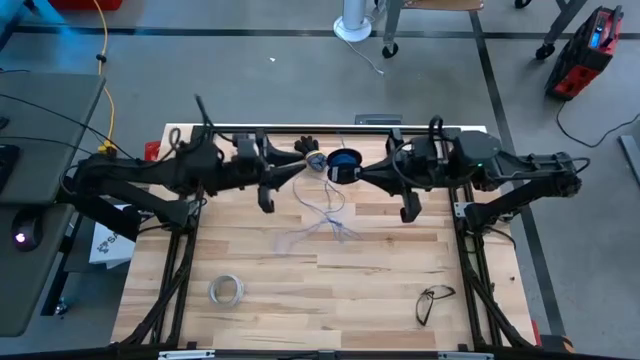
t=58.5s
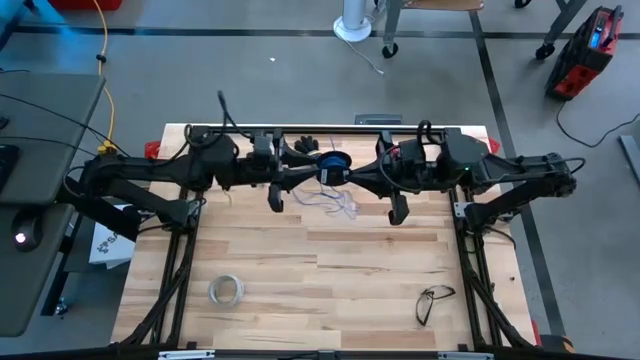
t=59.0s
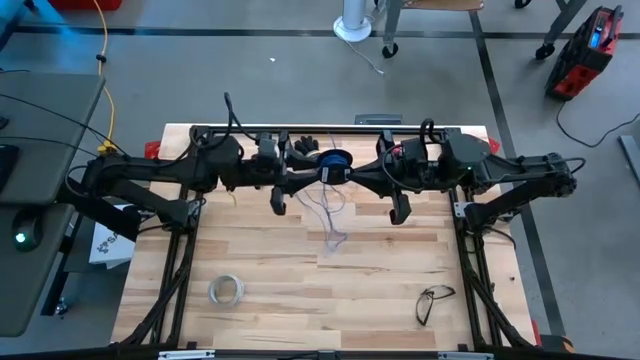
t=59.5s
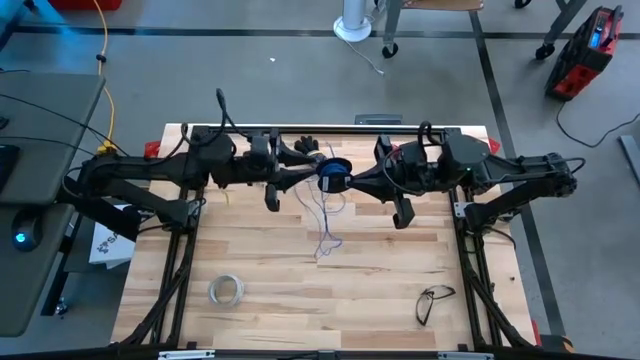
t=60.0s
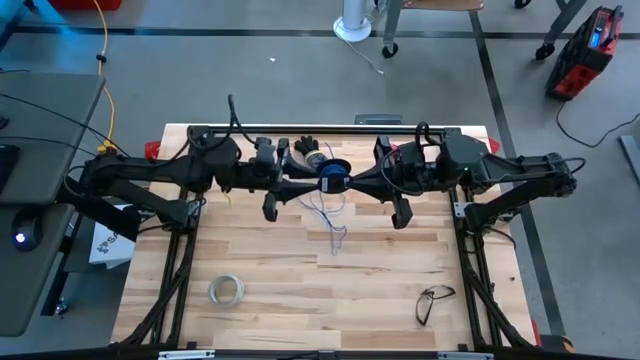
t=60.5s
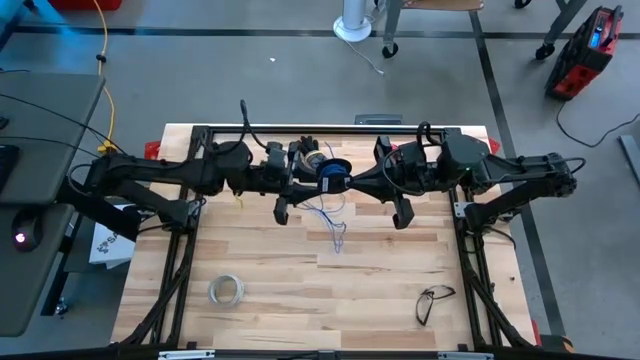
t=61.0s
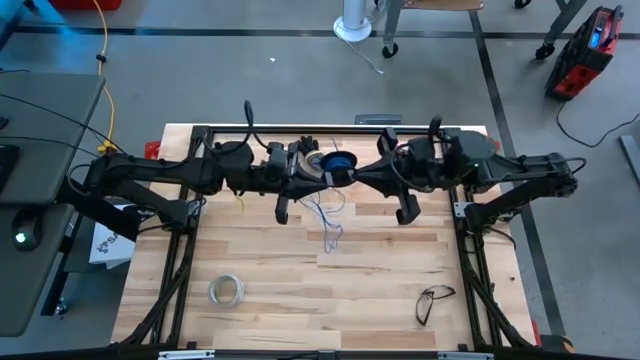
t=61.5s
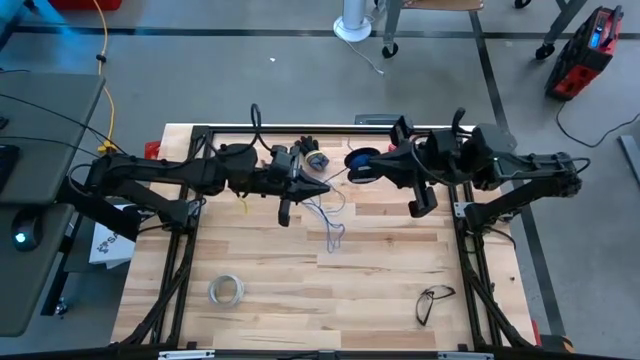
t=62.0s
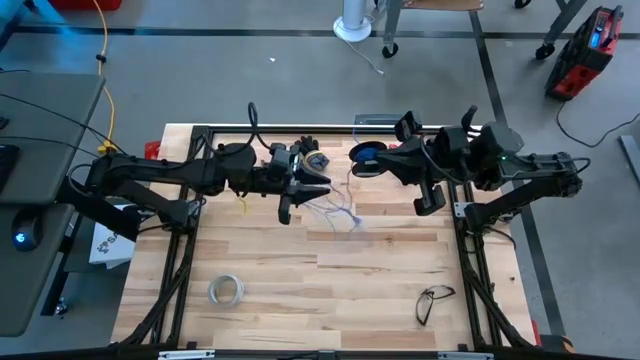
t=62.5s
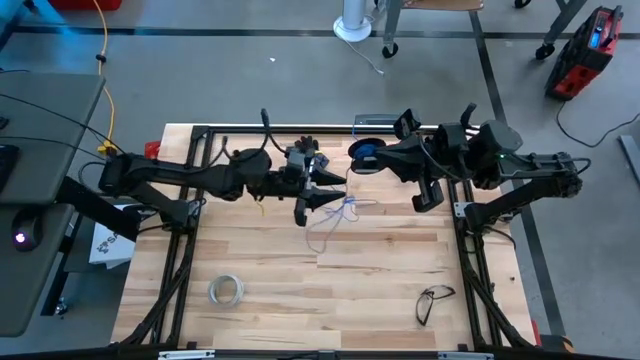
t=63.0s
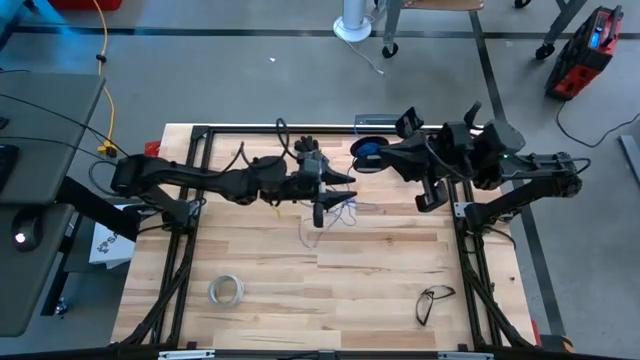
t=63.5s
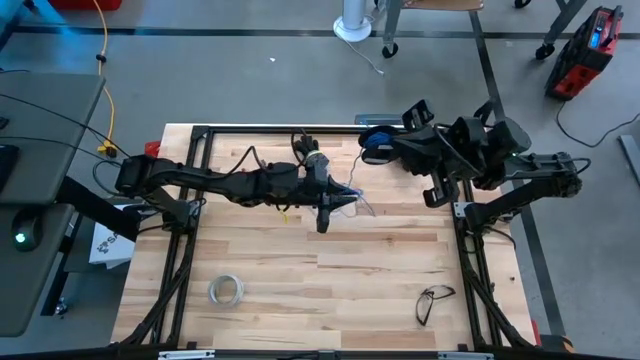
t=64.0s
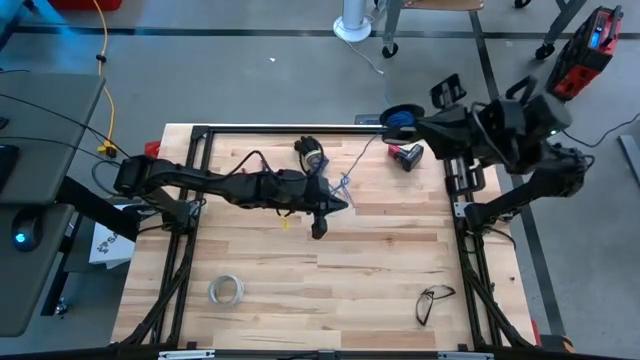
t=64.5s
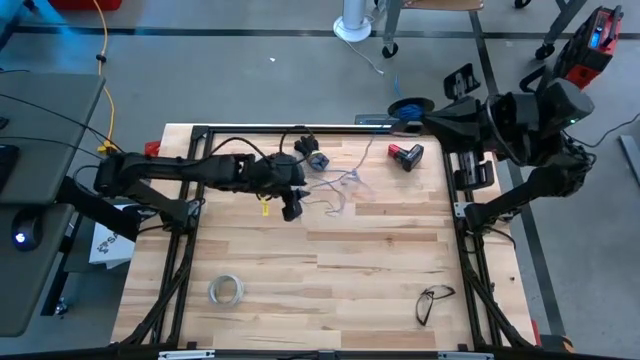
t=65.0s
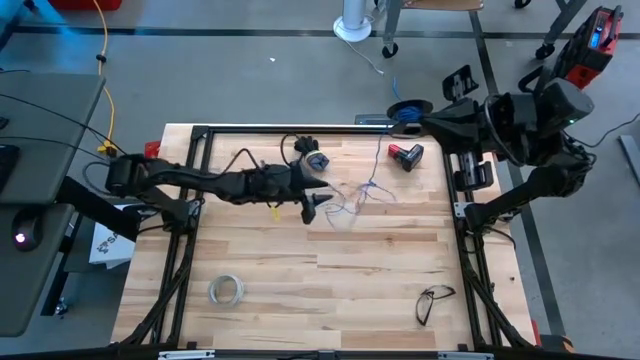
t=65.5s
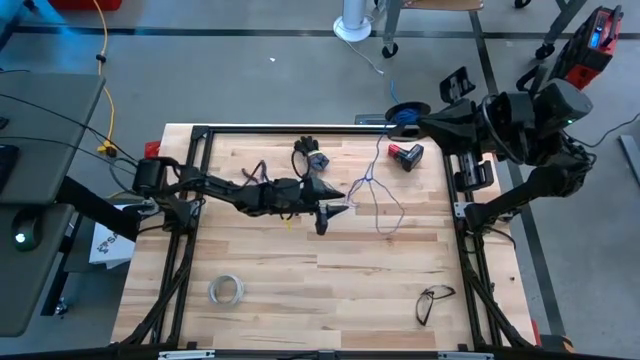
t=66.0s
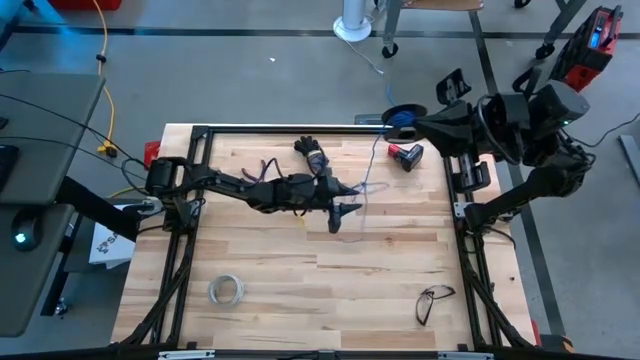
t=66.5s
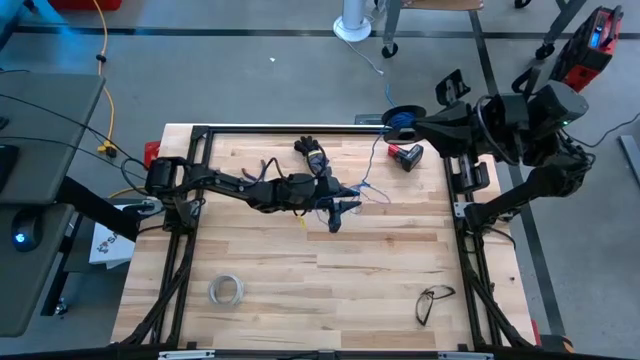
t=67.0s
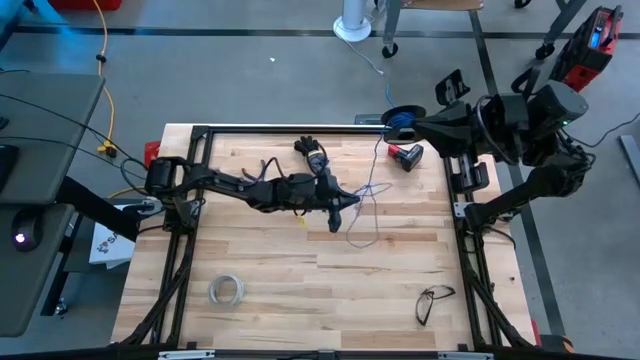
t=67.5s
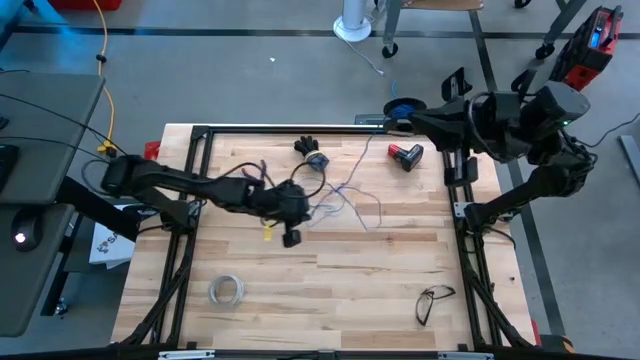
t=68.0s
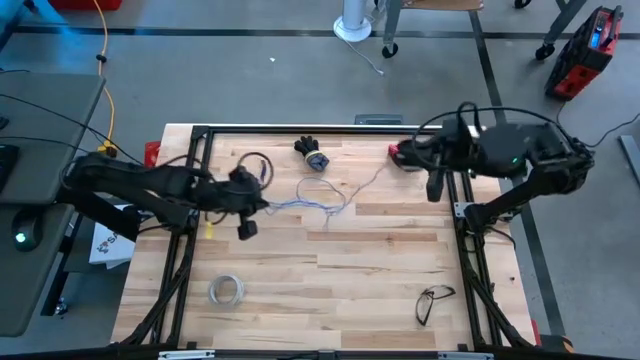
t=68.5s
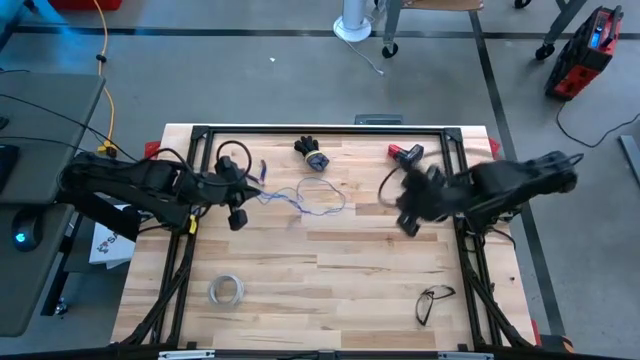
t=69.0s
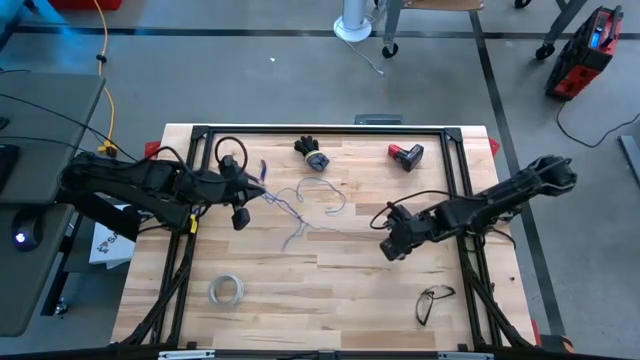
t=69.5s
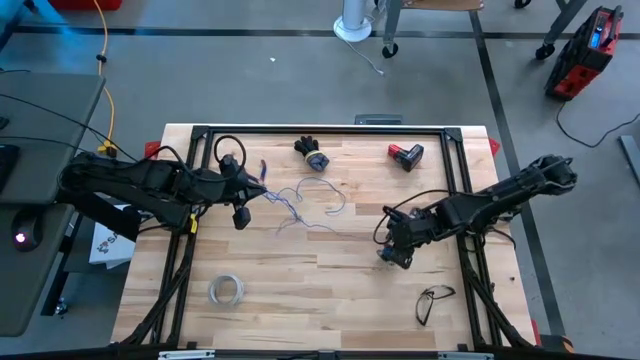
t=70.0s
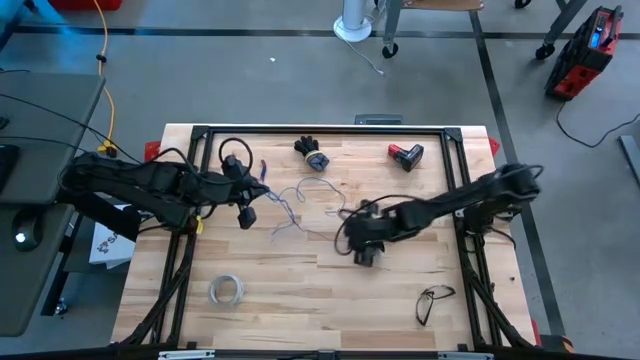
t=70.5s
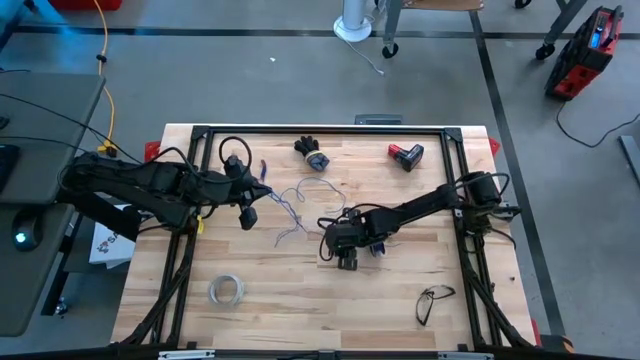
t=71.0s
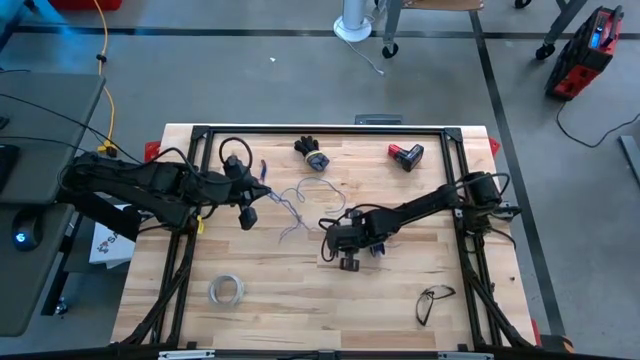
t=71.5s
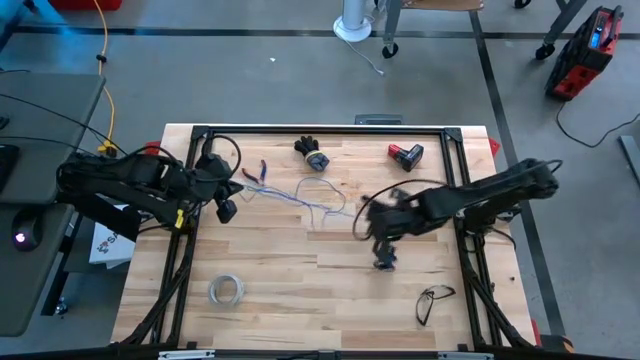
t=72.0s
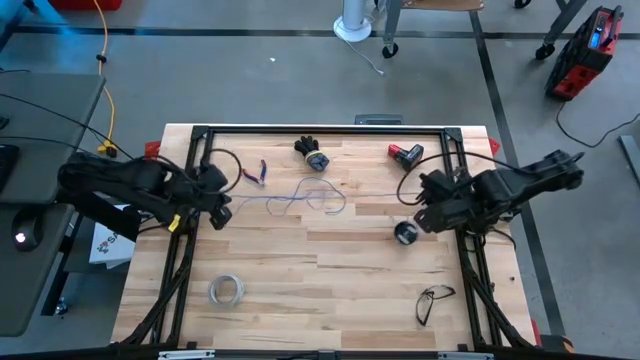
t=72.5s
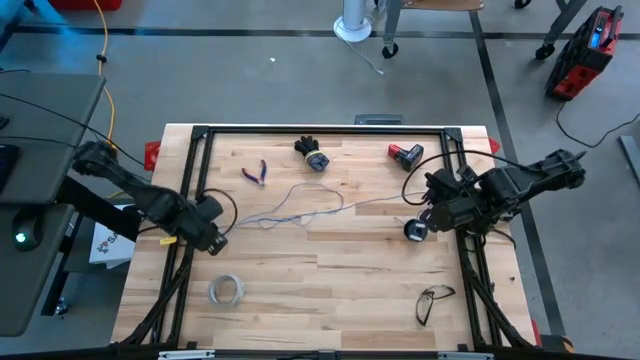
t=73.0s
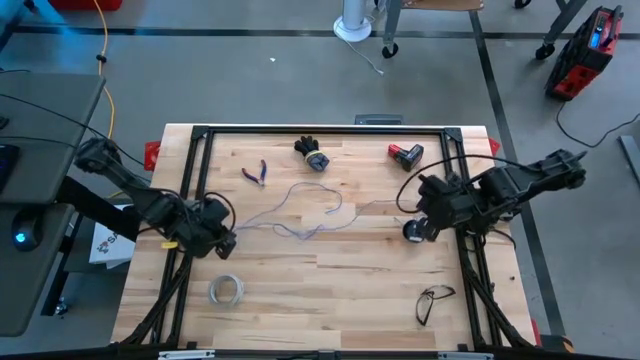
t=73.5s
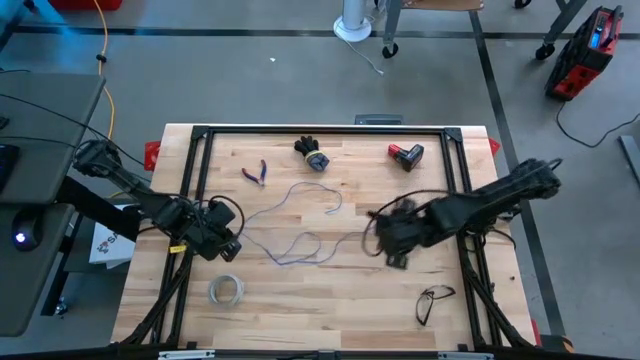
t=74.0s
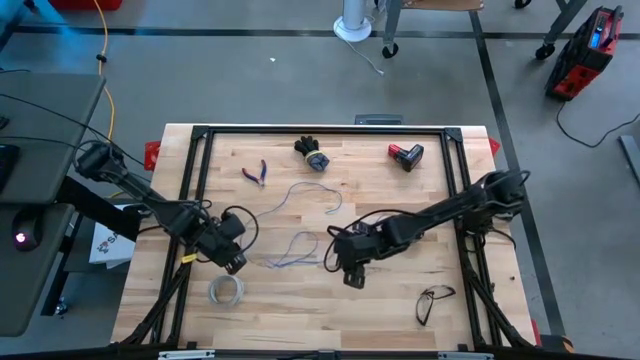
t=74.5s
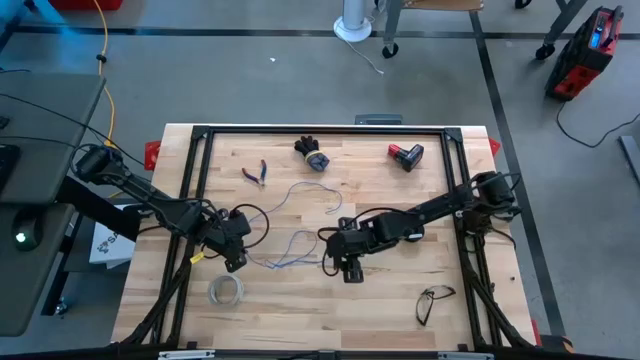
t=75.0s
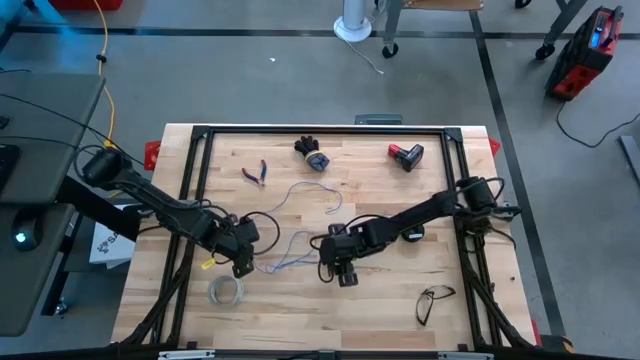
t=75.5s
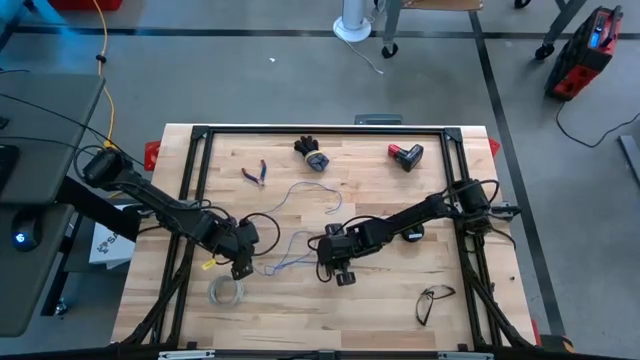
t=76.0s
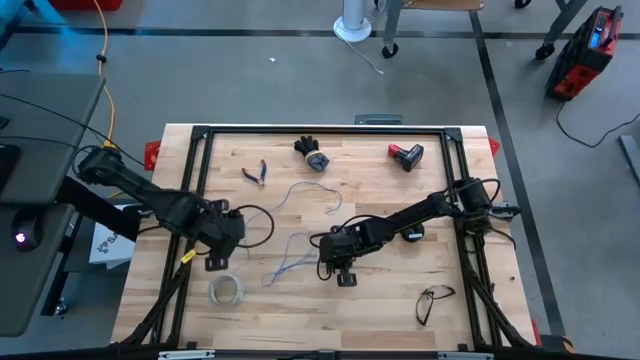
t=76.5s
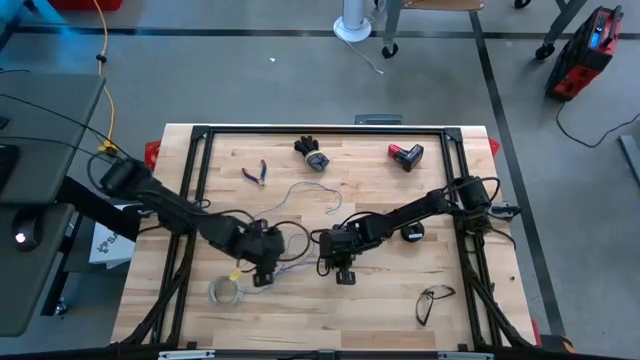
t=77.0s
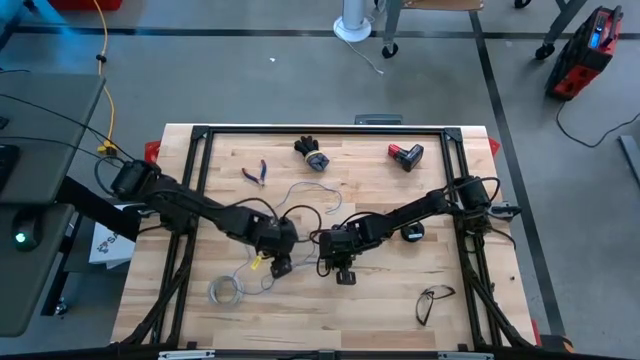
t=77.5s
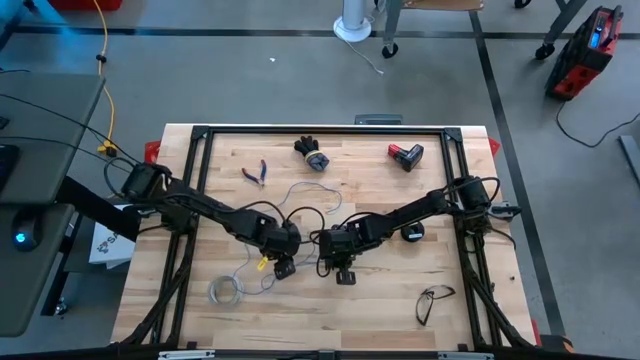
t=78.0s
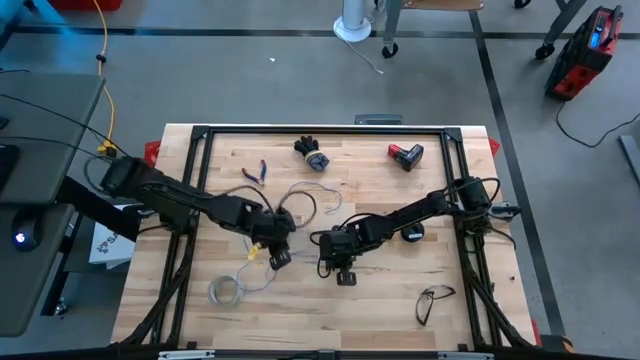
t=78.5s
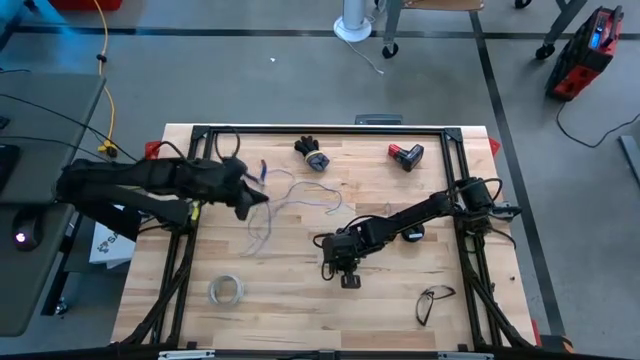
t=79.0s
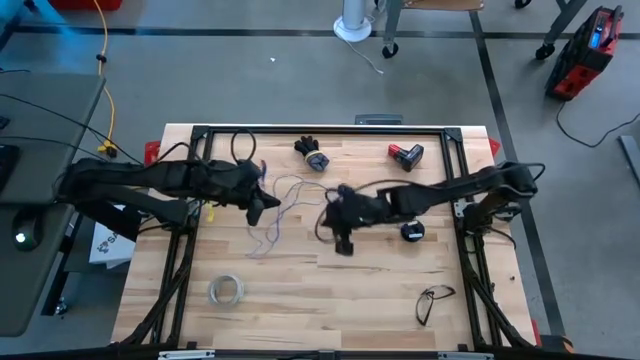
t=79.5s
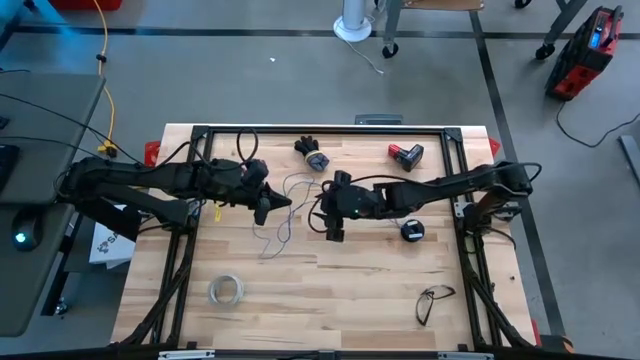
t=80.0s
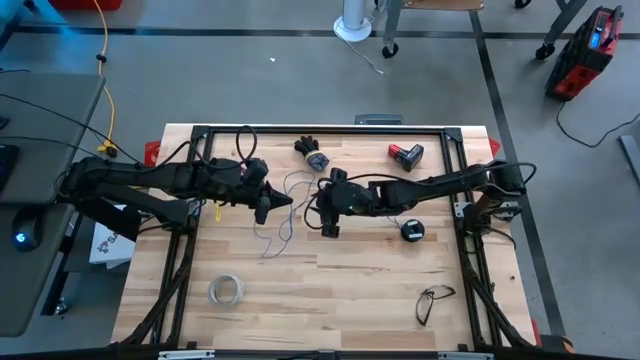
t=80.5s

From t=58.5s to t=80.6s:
Task: Coil cords
Uncoil the blue wire from the black spool
